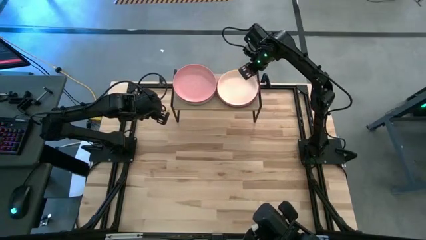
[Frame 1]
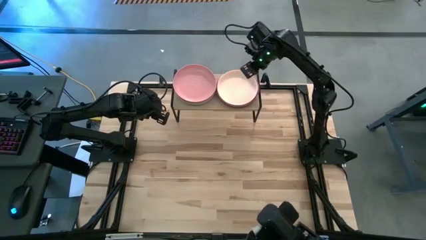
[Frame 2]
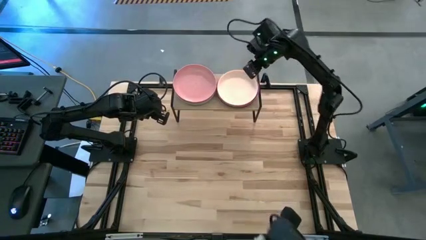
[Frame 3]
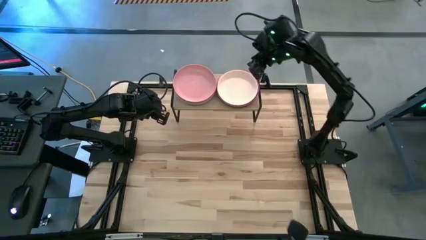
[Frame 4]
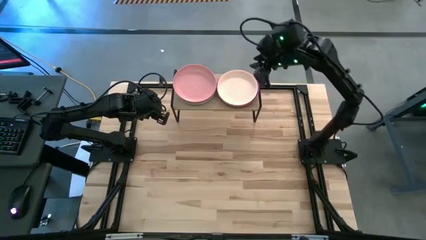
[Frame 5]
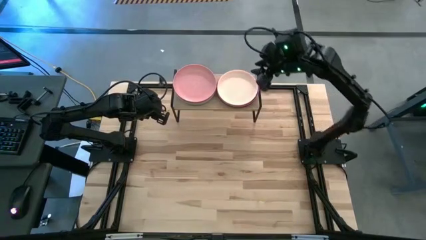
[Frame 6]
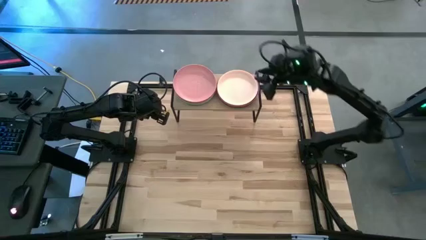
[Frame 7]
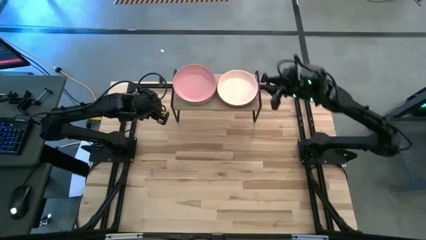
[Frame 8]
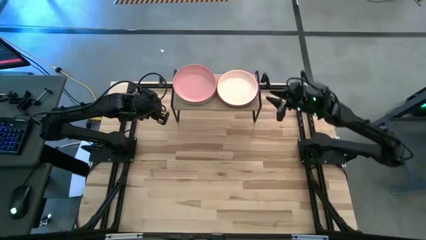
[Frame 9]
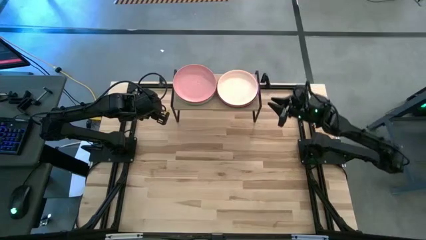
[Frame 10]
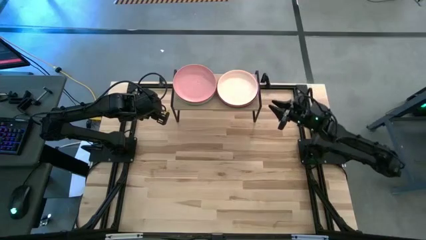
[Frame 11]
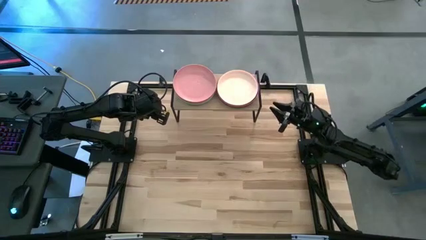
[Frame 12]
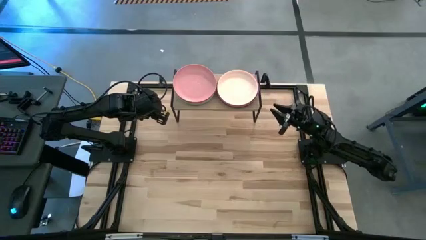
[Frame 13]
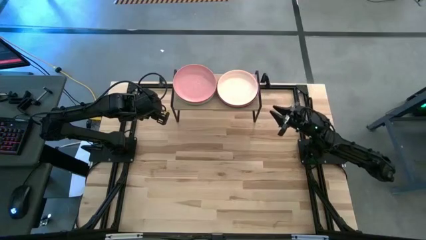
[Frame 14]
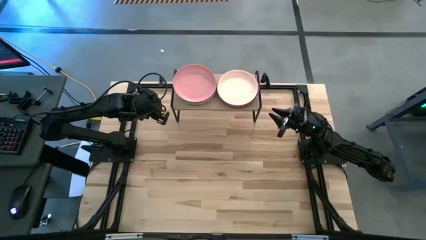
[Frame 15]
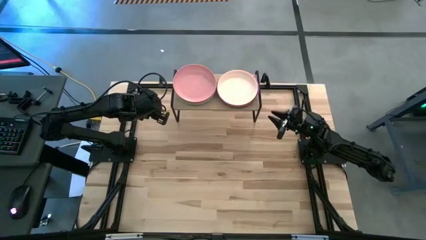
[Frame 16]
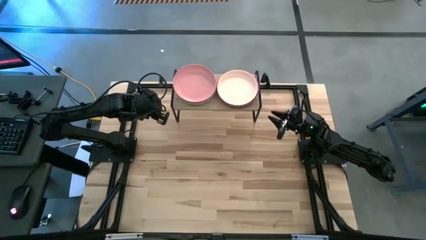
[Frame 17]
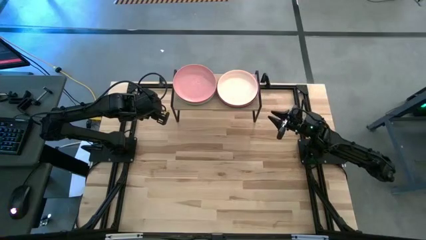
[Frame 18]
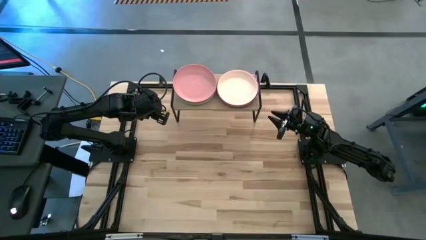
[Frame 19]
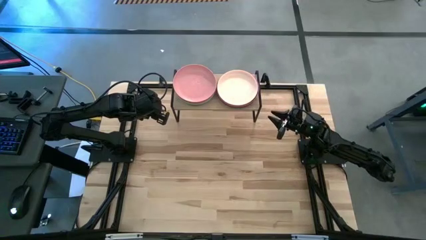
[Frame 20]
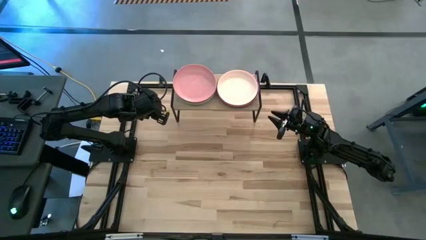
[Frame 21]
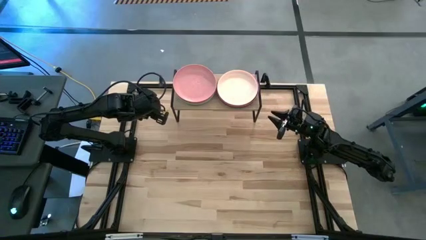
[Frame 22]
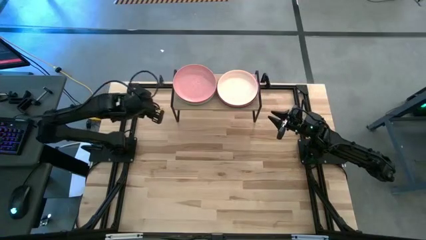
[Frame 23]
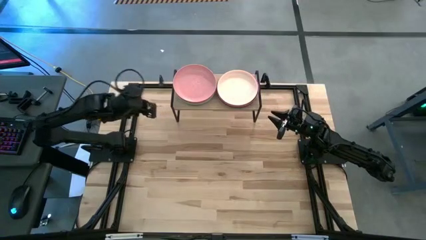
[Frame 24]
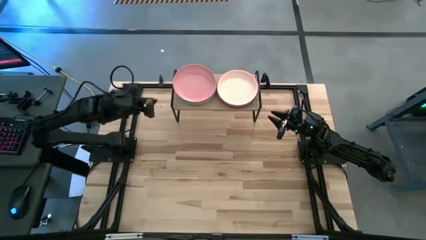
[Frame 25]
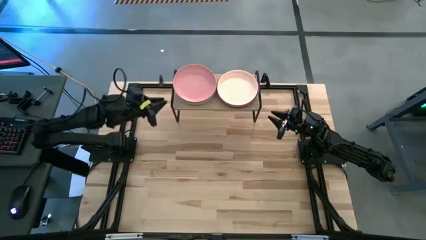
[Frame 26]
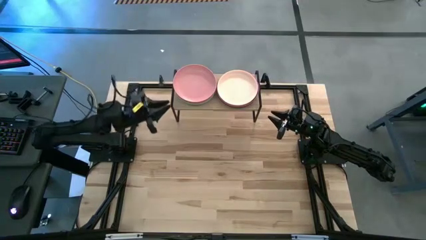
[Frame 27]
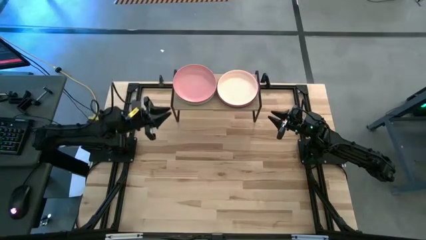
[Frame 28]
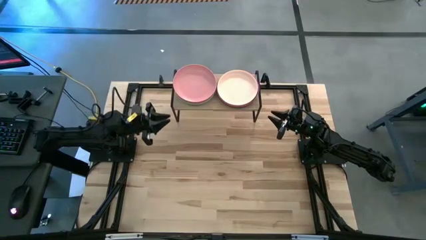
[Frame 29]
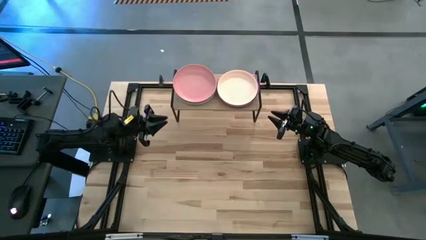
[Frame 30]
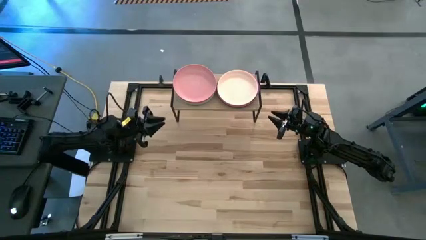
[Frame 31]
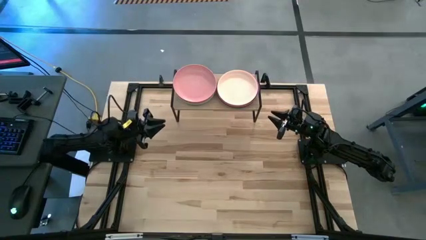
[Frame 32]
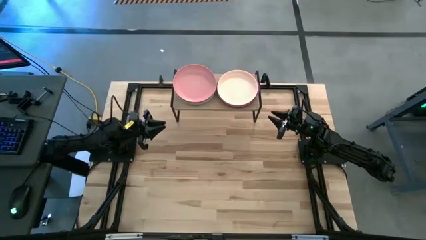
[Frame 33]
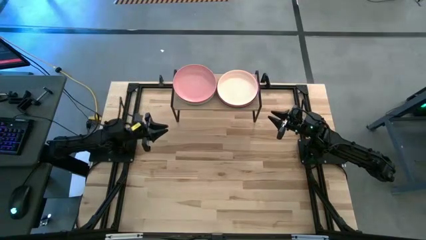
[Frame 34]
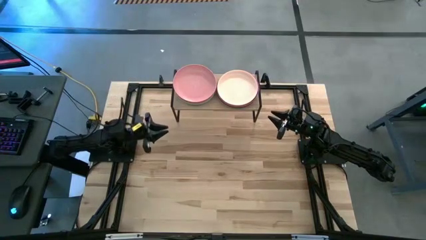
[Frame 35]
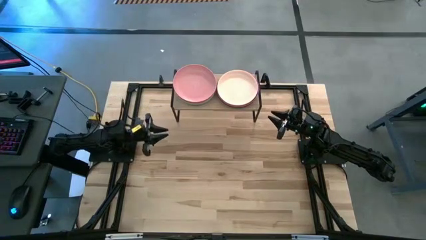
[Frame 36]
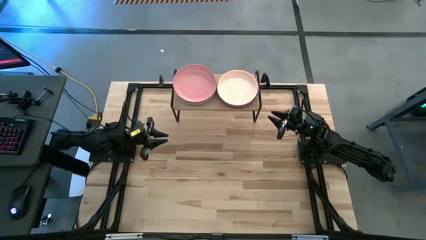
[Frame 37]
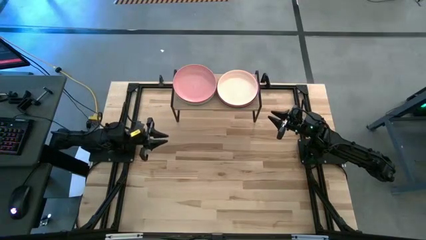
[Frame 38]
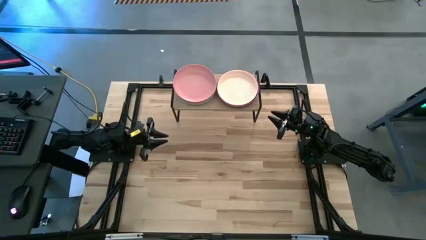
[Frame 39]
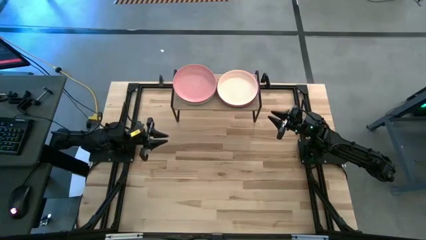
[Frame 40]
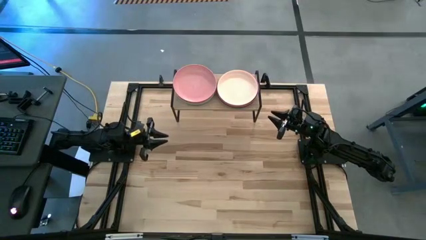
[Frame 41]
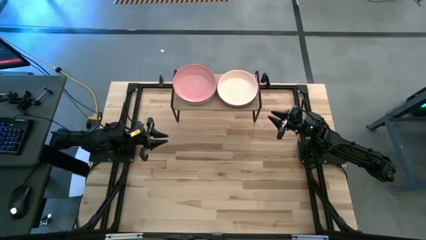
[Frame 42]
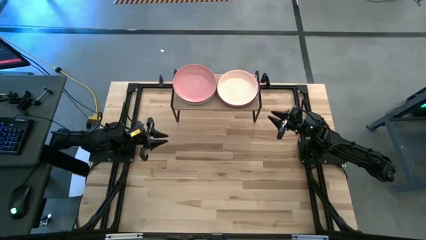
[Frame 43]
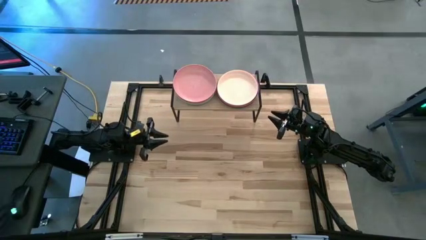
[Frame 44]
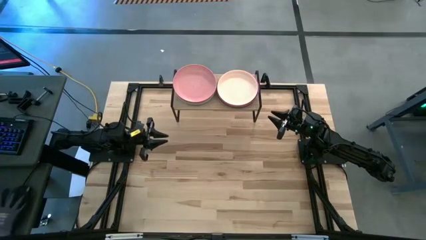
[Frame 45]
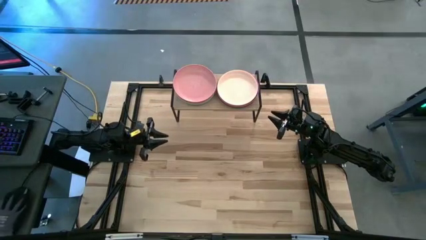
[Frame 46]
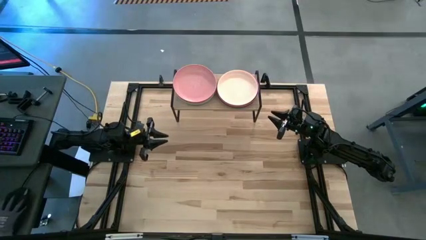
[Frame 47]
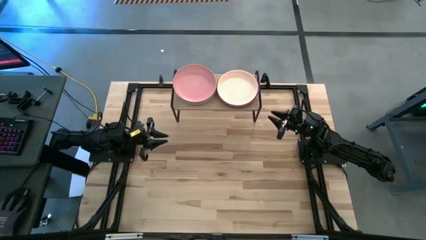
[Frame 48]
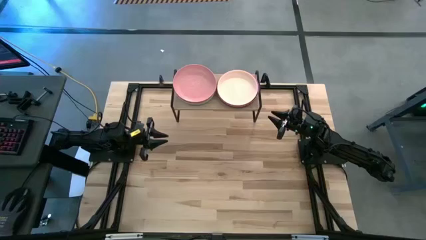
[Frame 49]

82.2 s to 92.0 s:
Task: Place and stack plates onto a shelf
Return to Home Position

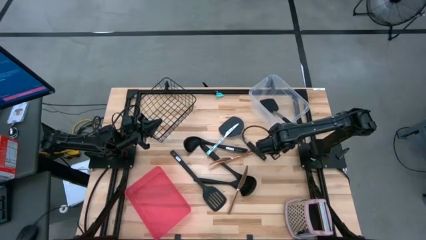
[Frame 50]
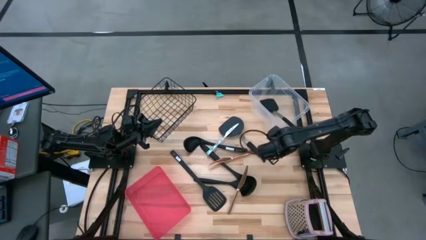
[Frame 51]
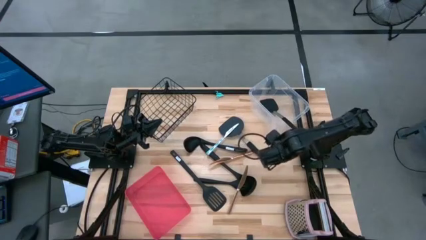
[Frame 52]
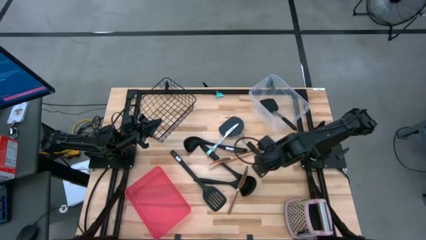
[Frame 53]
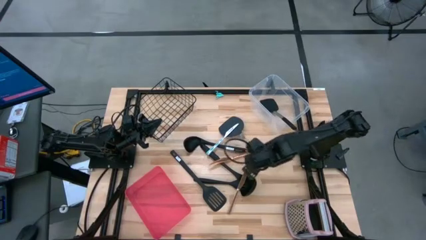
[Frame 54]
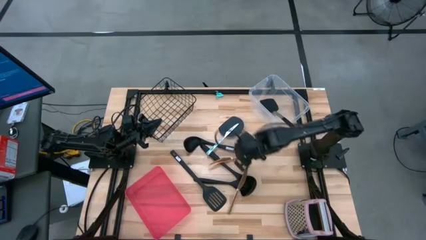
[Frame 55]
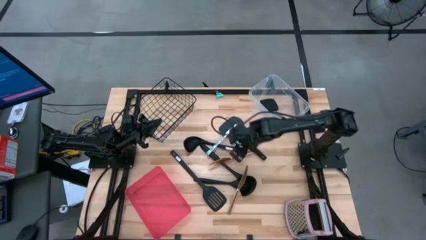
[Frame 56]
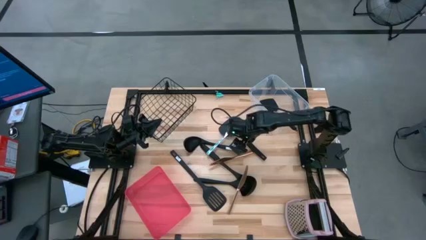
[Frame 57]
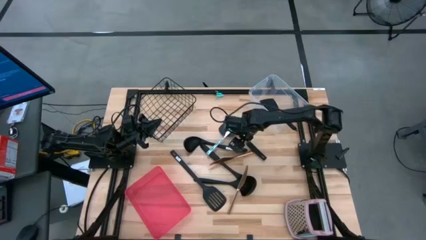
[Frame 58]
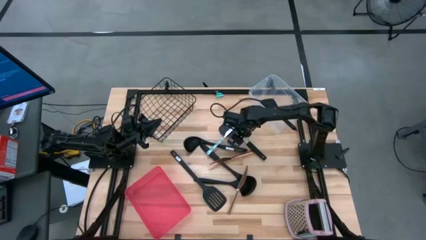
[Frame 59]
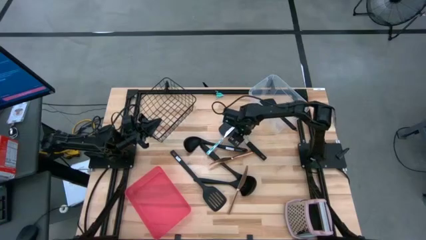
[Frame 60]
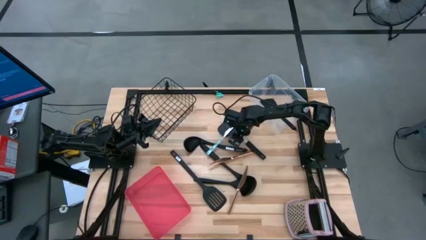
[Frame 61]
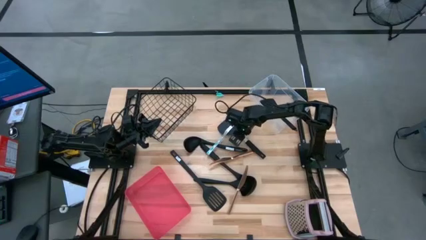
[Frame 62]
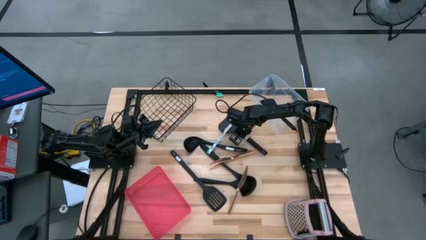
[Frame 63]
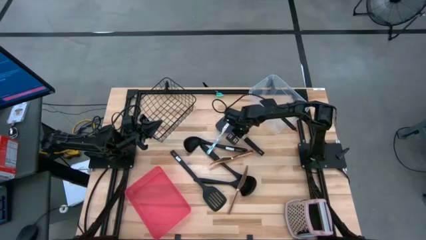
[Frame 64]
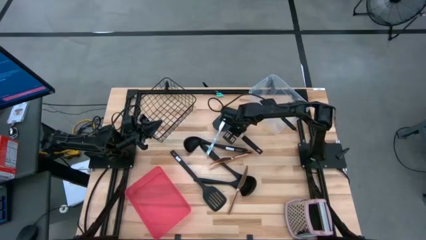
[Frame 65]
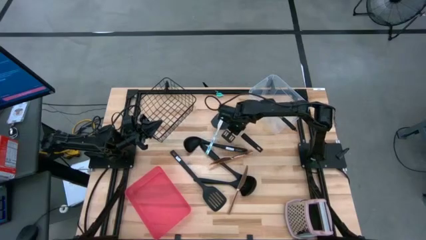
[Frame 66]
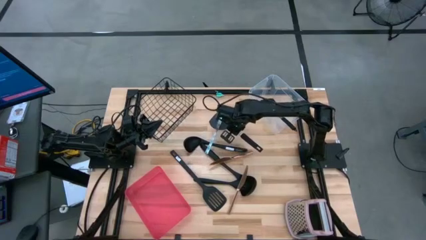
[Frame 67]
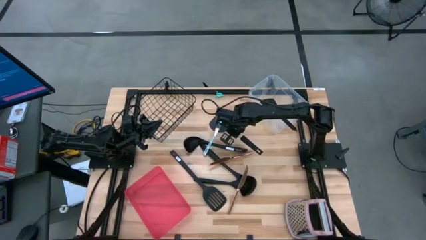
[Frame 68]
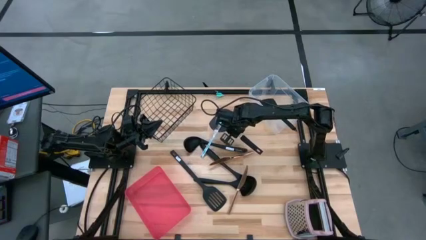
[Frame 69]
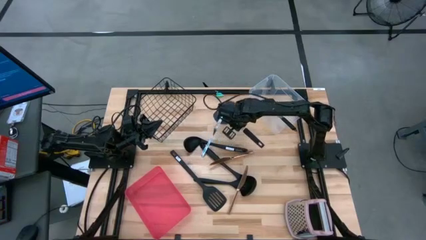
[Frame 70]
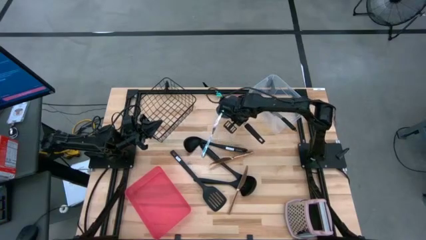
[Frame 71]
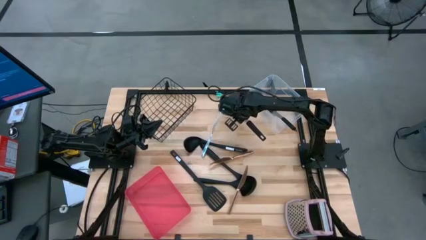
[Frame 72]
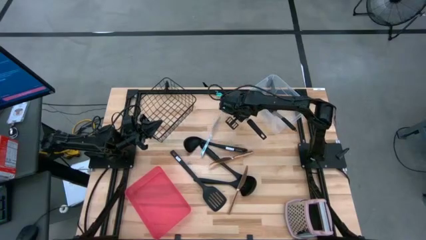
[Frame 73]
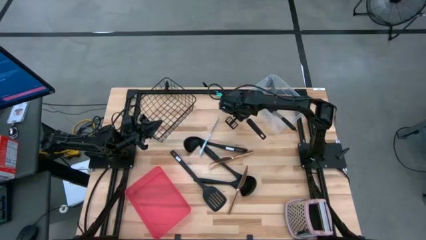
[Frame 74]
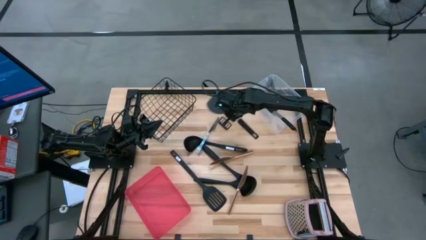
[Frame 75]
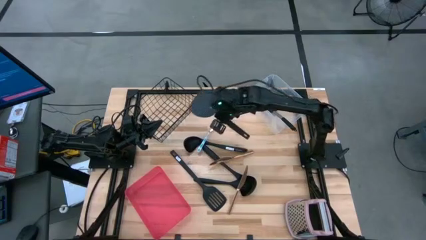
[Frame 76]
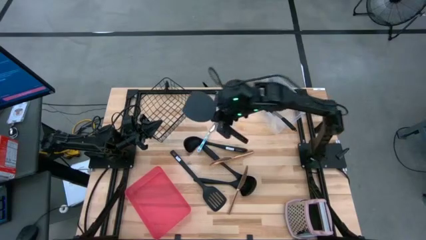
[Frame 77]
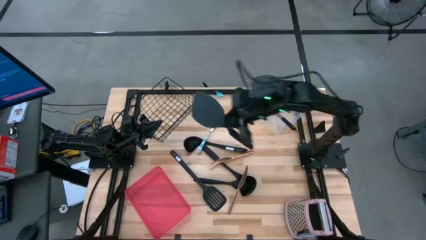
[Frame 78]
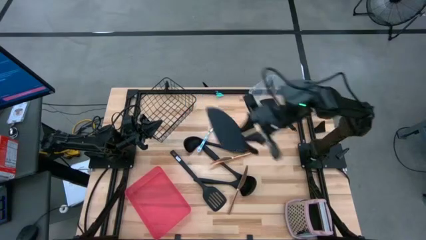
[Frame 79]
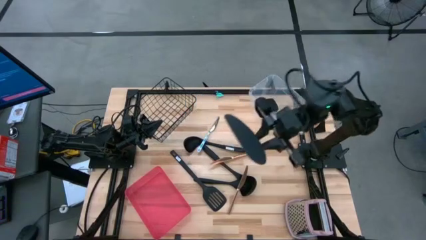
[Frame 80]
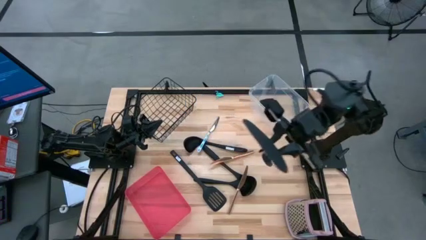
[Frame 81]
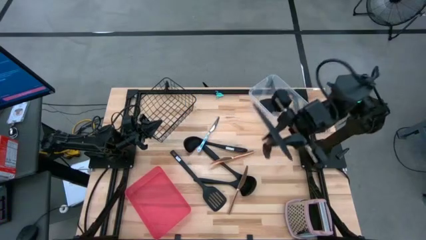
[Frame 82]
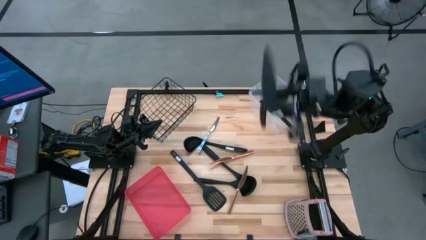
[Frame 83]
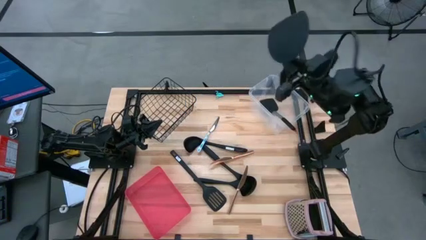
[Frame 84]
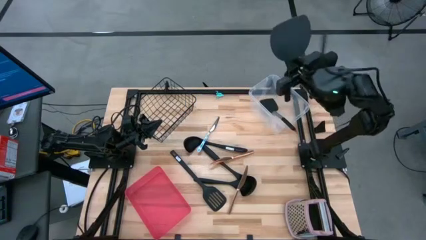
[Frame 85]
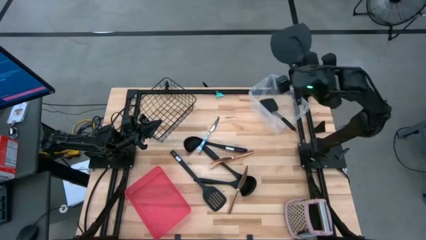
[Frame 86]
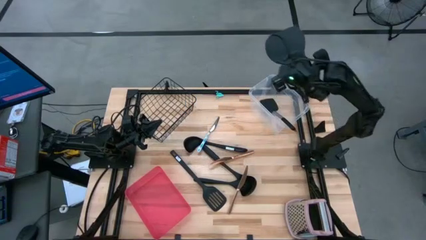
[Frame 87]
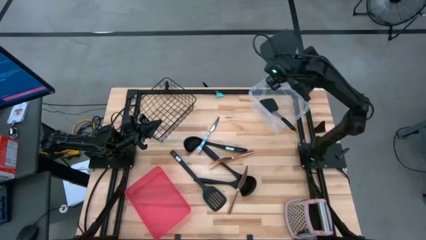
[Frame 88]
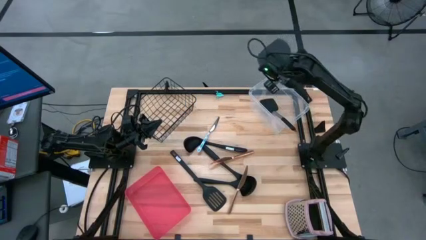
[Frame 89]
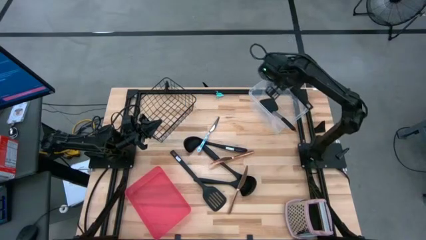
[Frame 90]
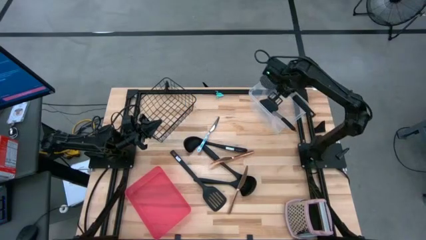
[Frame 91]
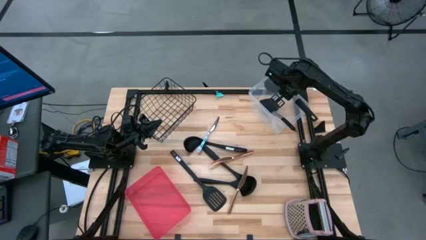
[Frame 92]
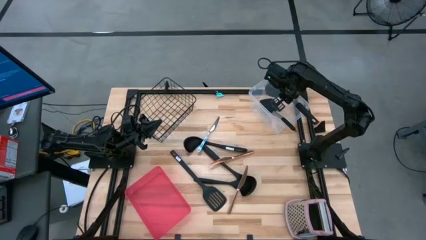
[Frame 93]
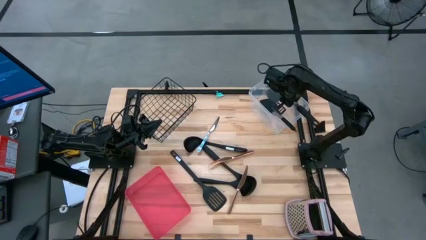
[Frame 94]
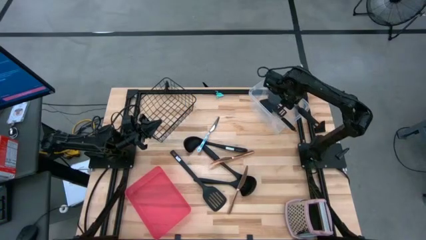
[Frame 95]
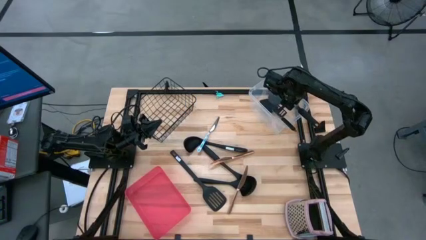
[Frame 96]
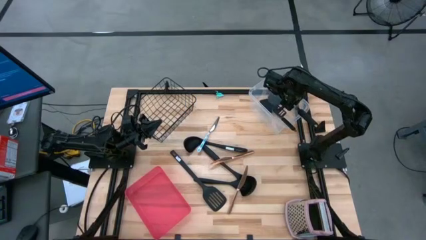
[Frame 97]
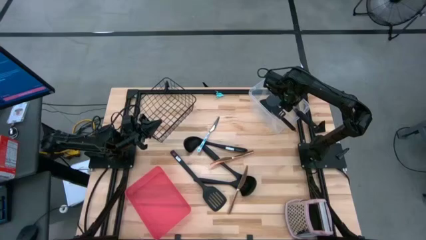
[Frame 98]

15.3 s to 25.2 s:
Task: Pick & Place Kitchen Items
Put the black solid turner into the transparent bin
